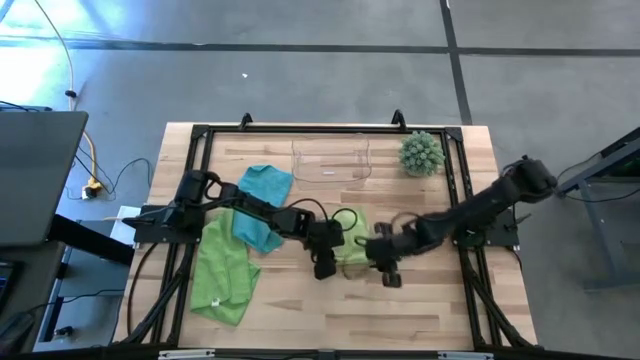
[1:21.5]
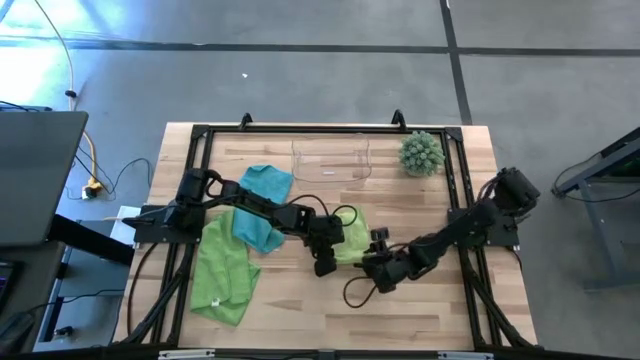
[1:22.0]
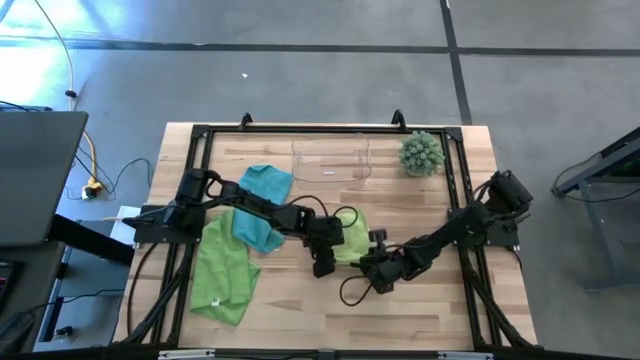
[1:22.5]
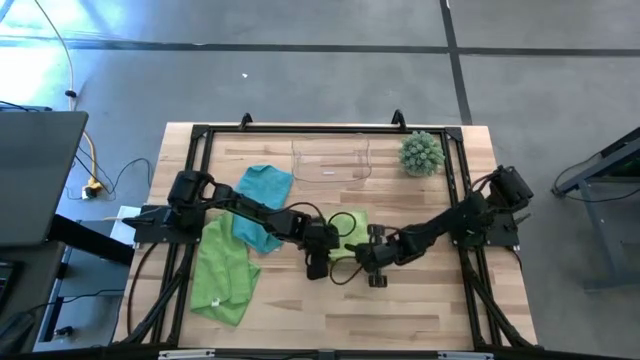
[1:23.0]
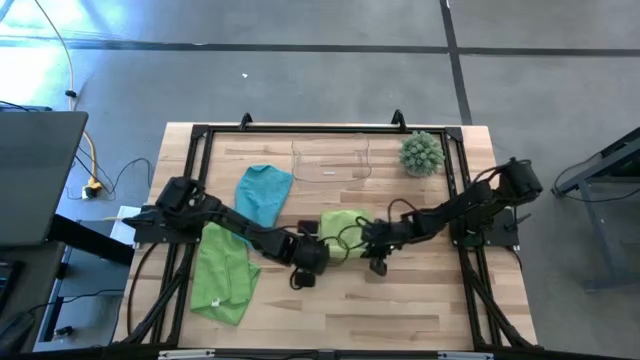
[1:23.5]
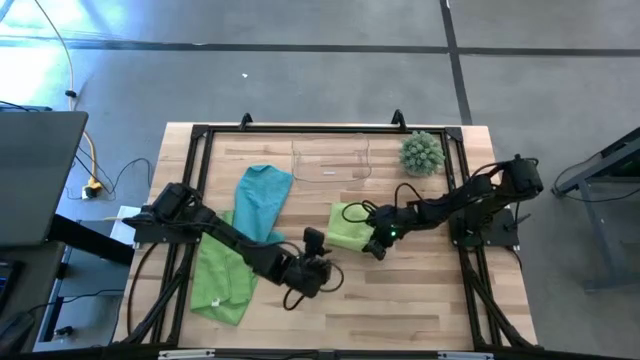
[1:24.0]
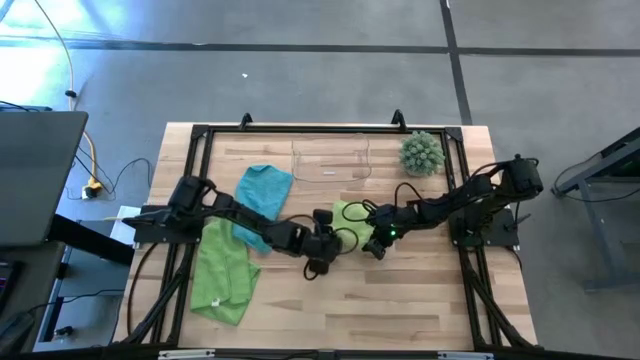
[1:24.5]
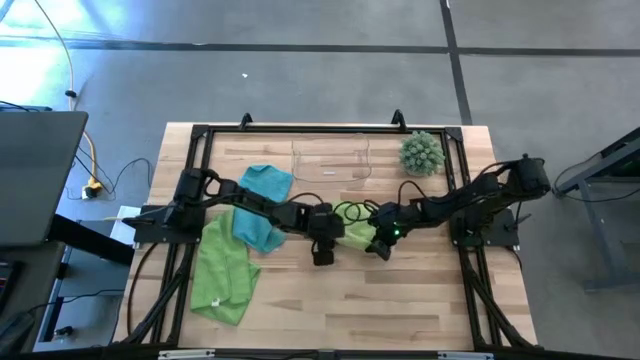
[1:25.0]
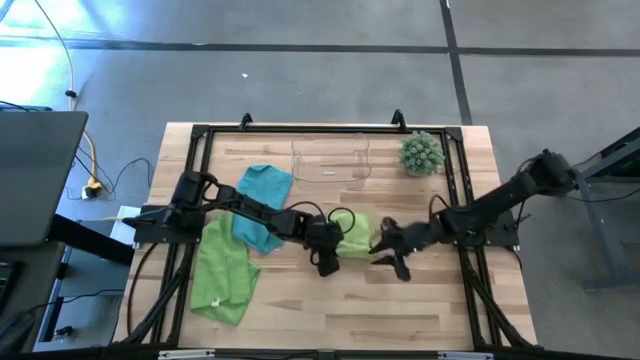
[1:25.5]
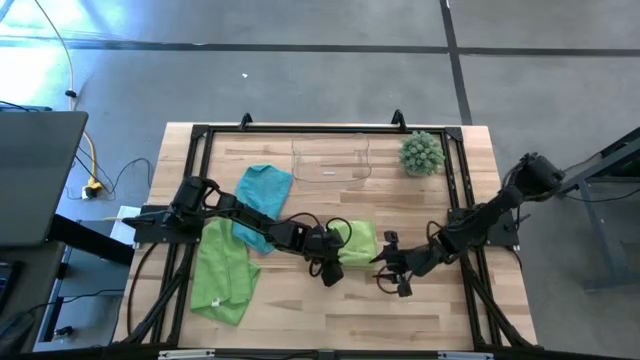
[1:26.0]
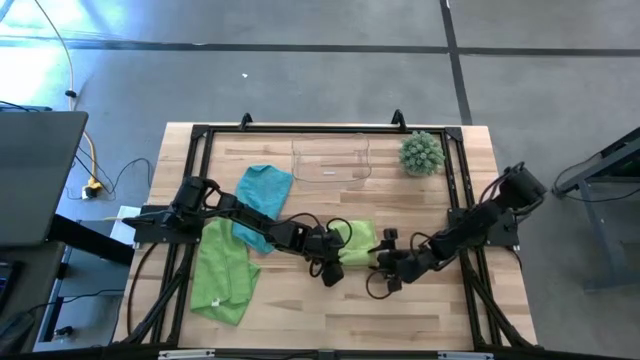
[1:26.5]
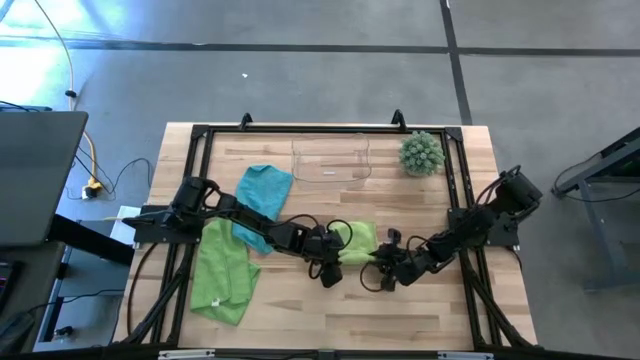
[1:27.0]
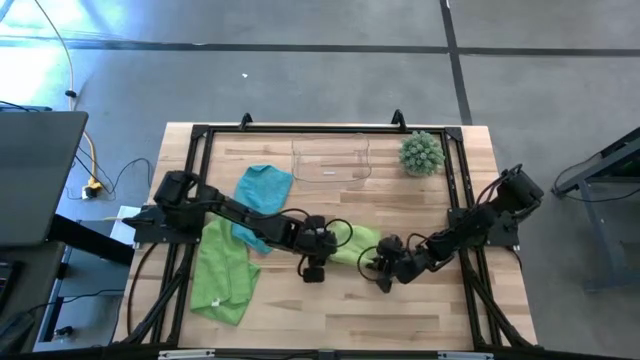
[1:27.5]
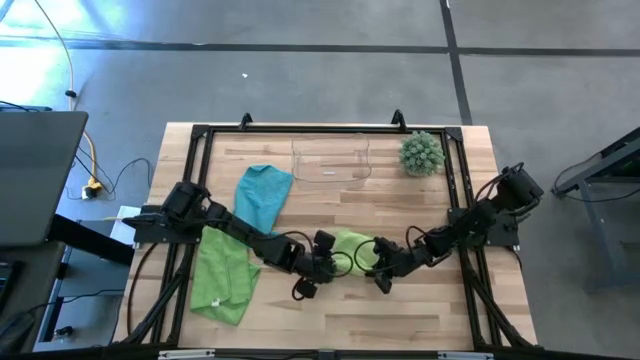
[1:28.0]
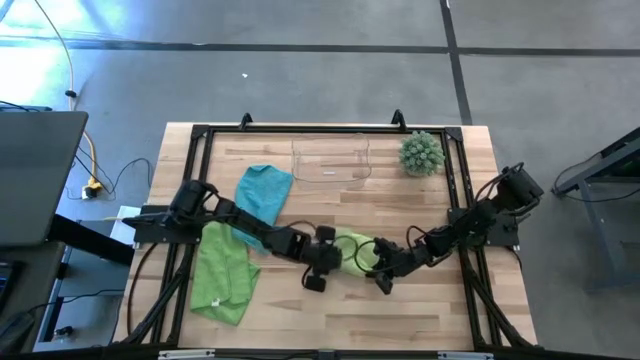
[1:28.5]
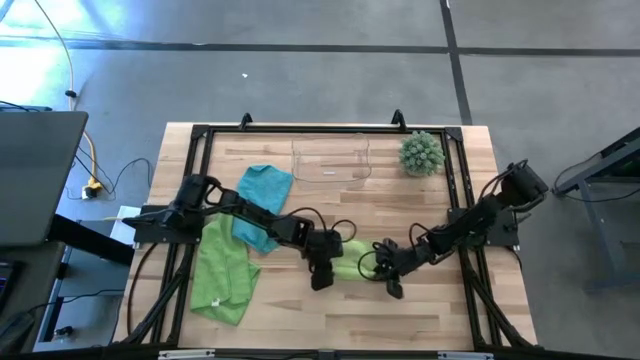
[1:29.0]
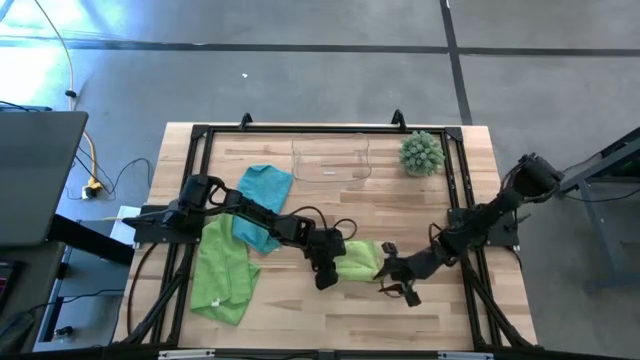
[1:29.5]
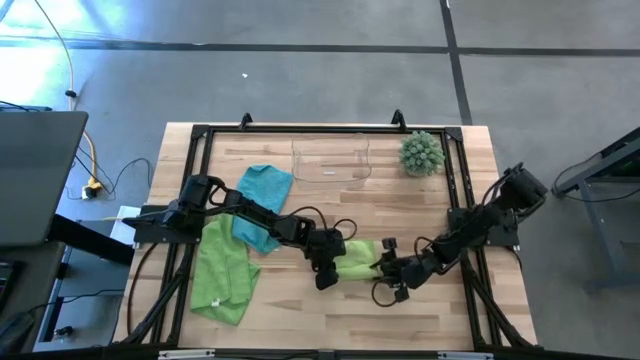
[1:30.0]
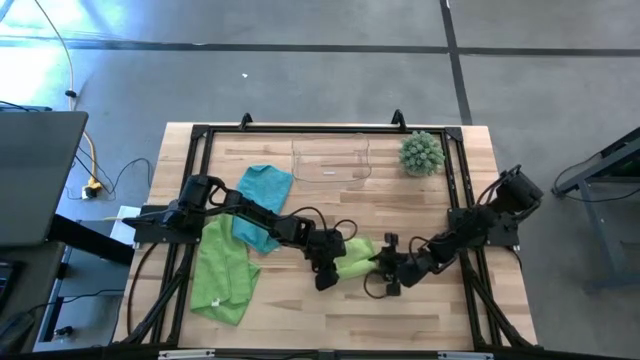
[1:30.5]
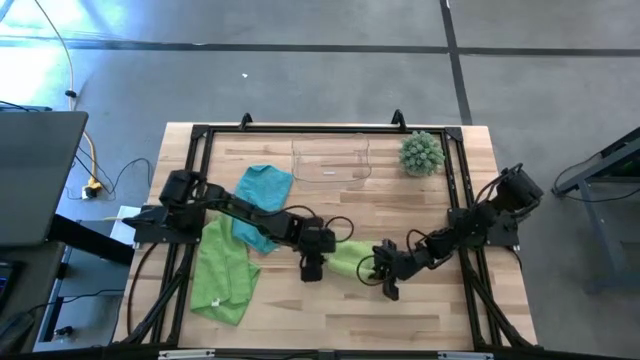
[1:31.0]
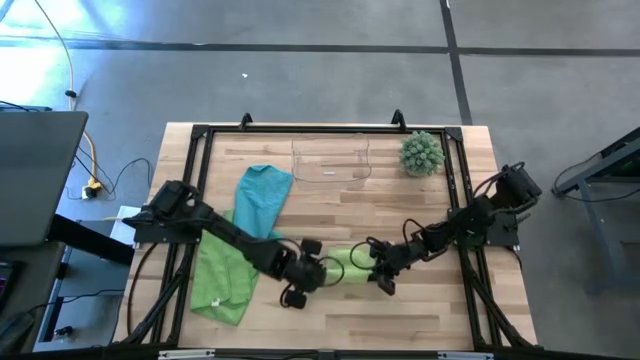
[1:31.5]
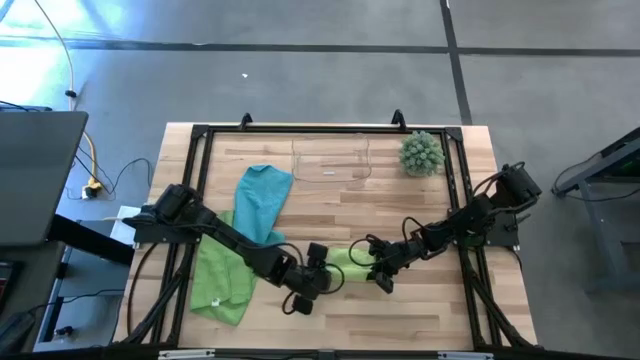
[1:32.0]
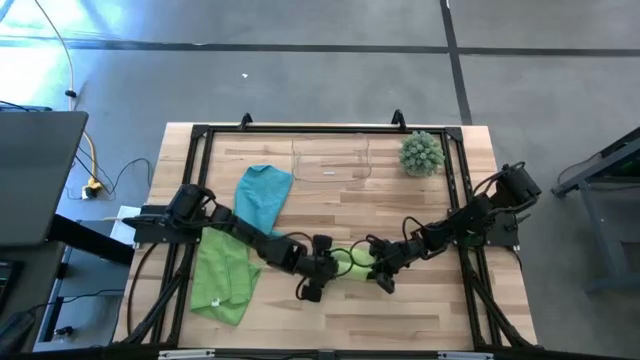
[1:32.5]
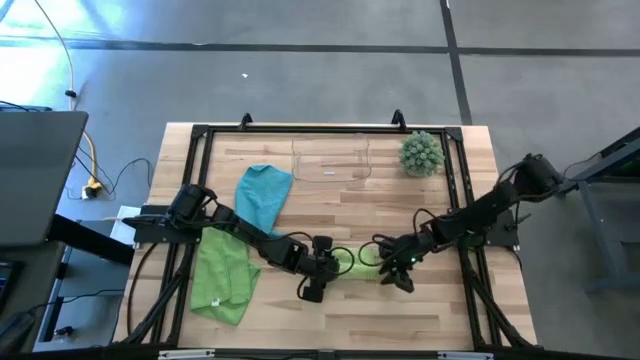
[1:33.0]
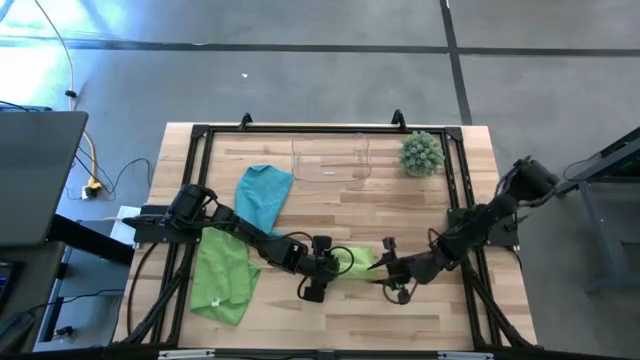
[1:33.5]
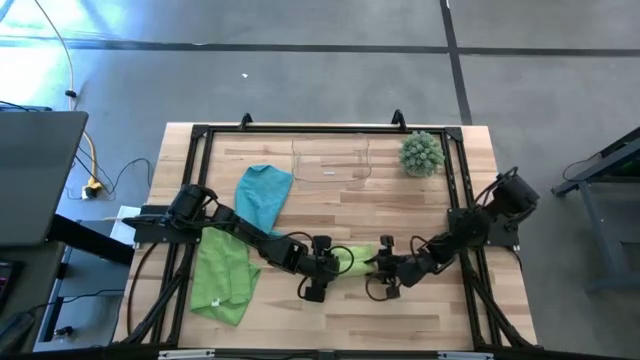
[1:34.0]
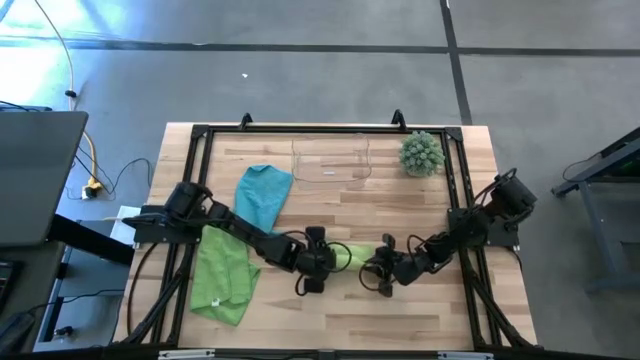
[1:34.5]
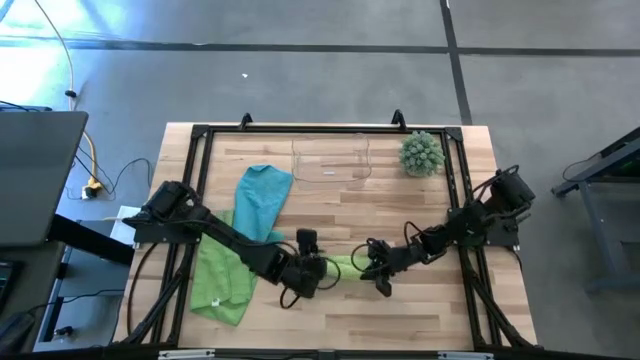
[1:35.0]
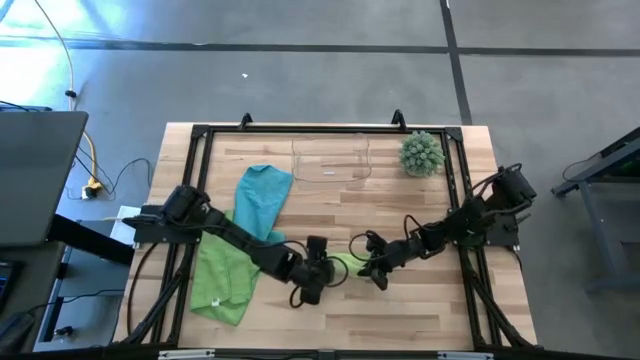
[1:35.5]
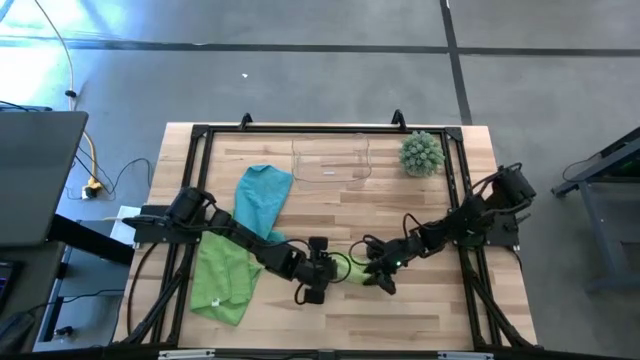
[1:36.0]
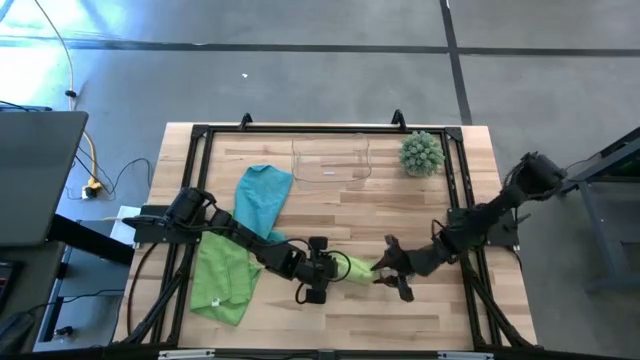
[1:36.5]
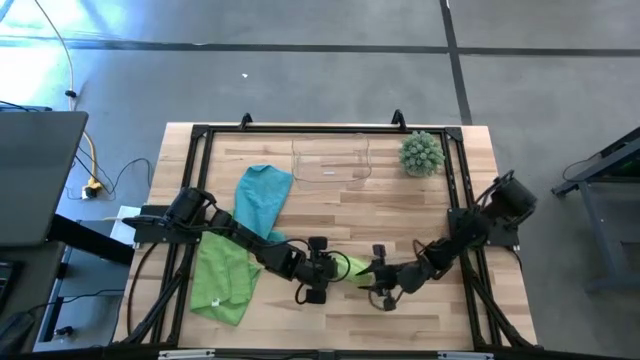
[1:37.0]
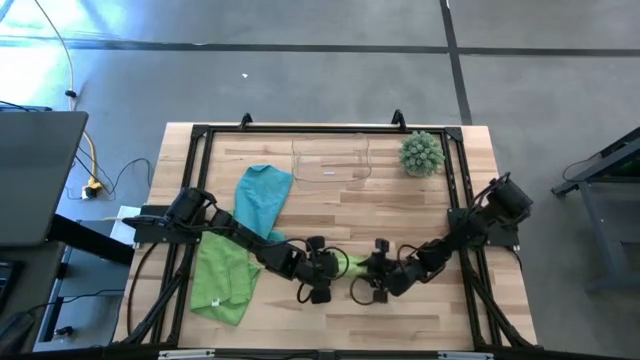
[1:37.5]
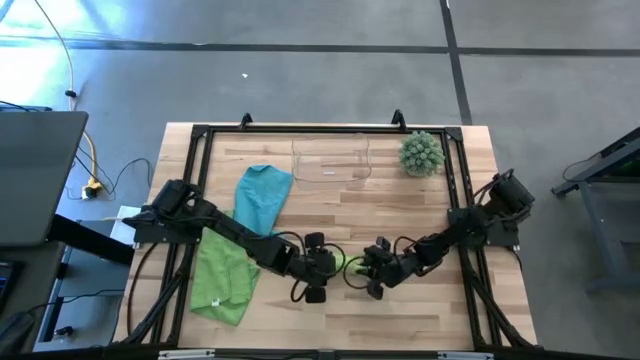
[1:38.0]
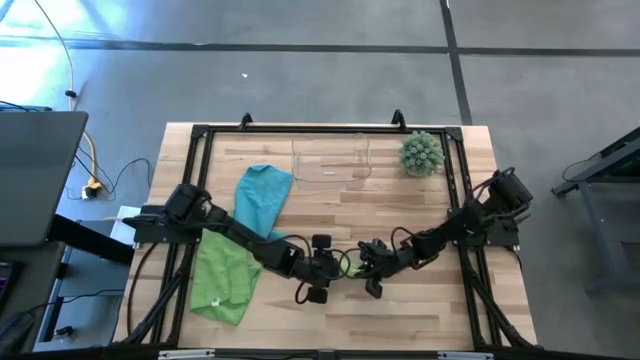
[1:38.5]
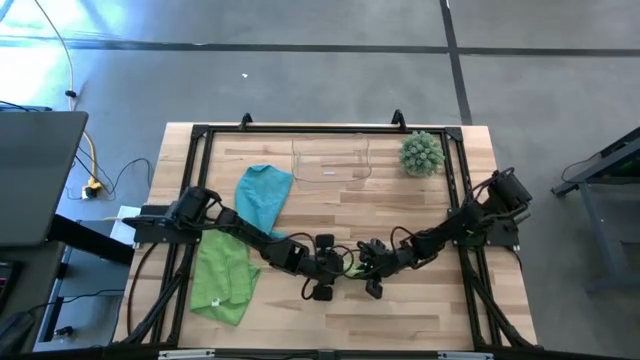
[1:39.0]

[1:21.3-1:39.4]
Task: Roll microfiber towels into tight, uniform cylinder then place into a basket
Roll the light green microfiber cloth

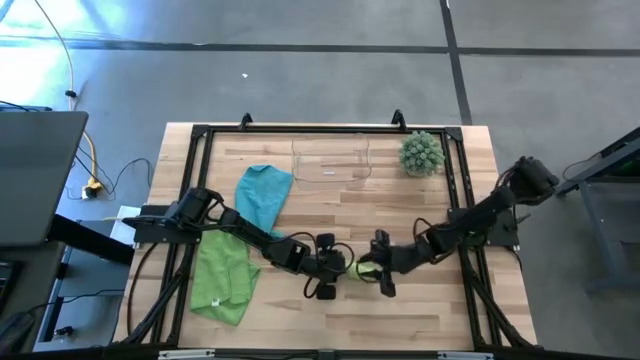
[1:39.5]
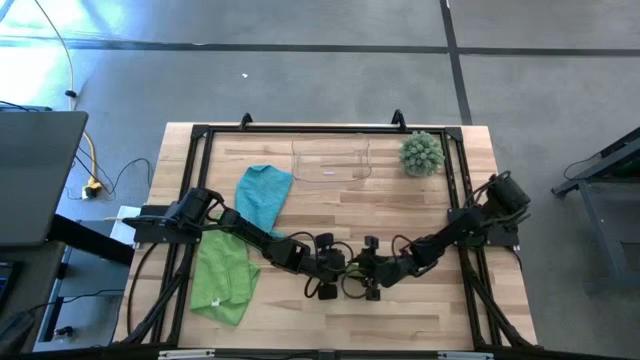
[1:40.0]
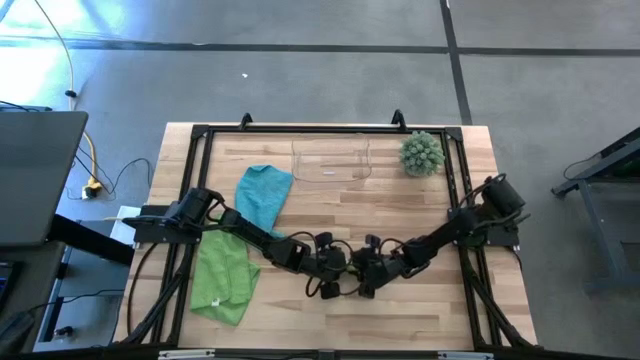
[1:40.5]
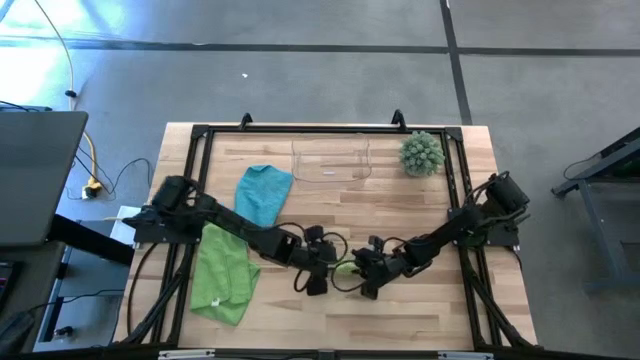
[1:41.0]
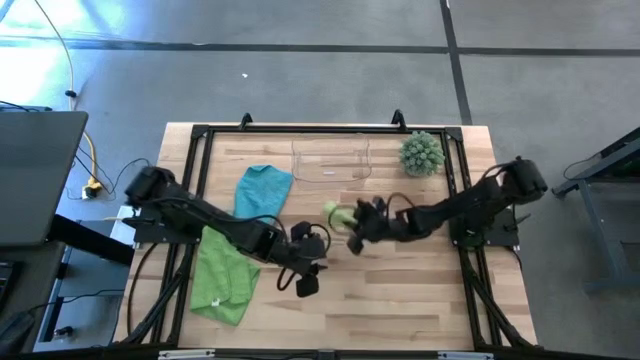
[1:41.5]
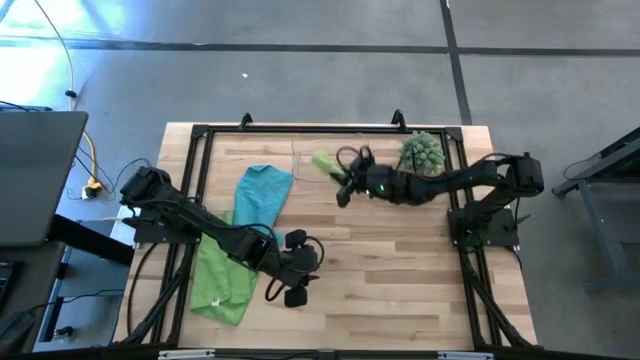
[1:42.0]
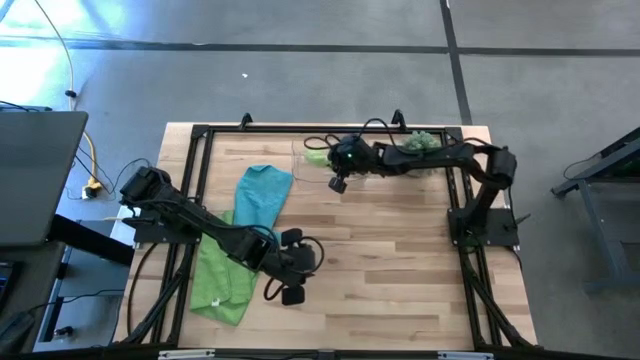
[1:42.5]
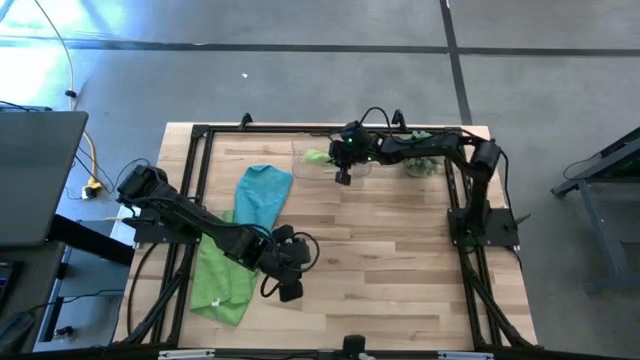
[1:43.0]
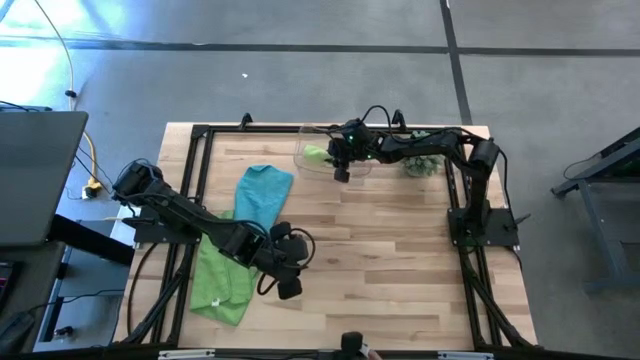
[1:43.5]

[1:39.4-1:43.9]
Put the light green microfiber cloth into the transparent bin

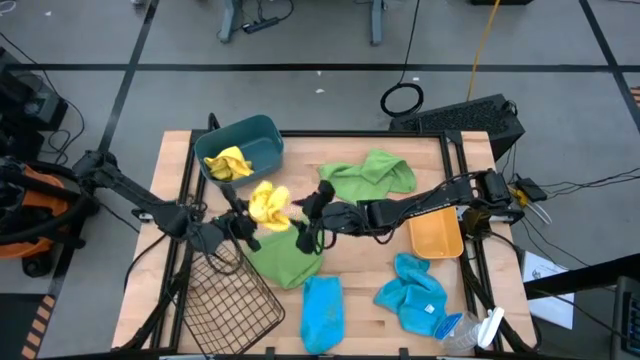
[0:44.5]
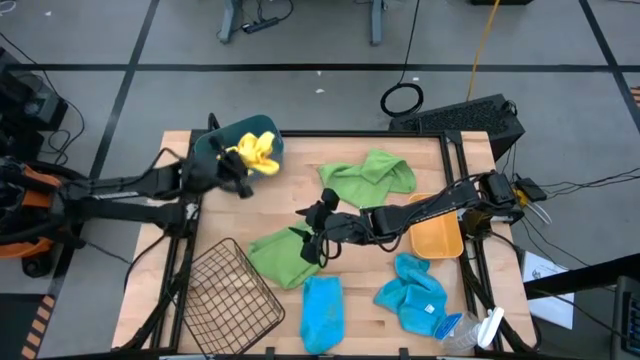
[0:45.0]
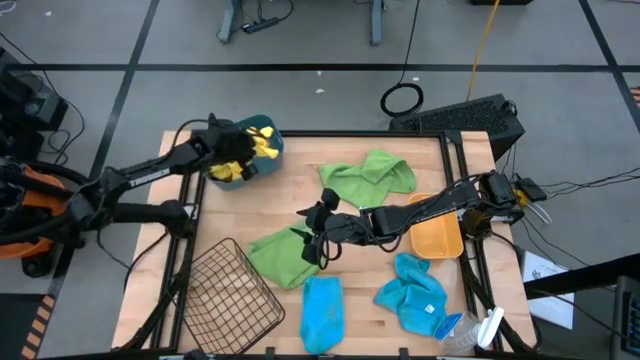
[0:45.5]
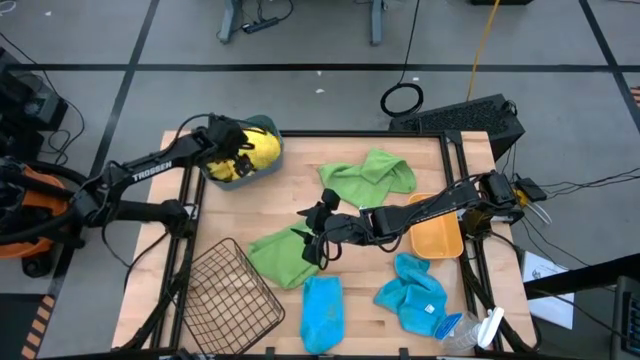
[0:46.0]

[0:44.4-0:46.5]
Task: Sort microfiber towel by color & place in baskets
Put middle right yellow towel into the green bin
